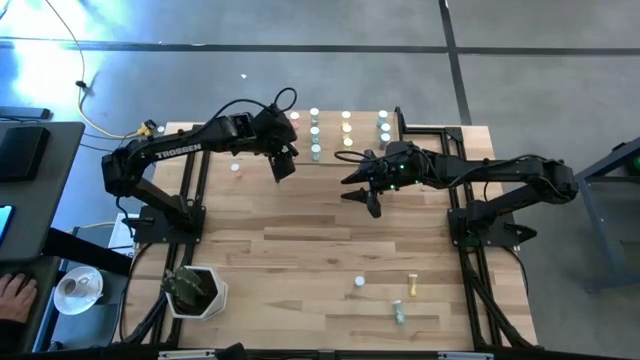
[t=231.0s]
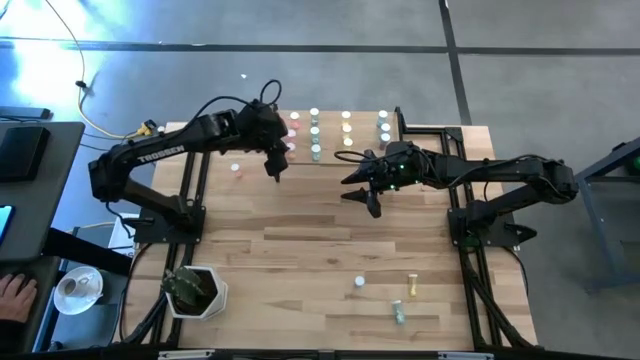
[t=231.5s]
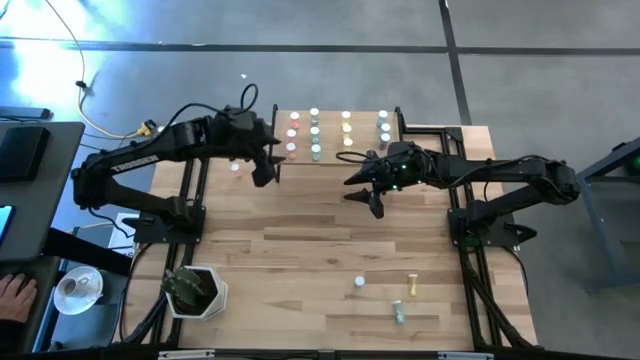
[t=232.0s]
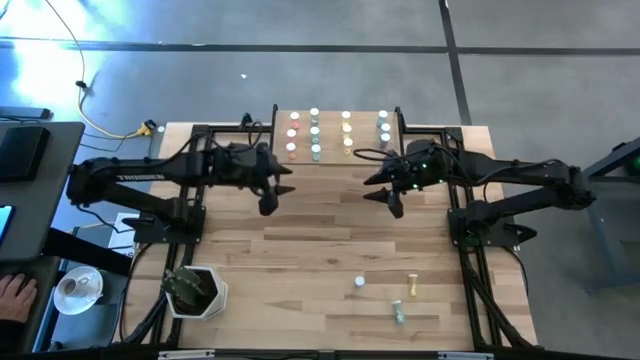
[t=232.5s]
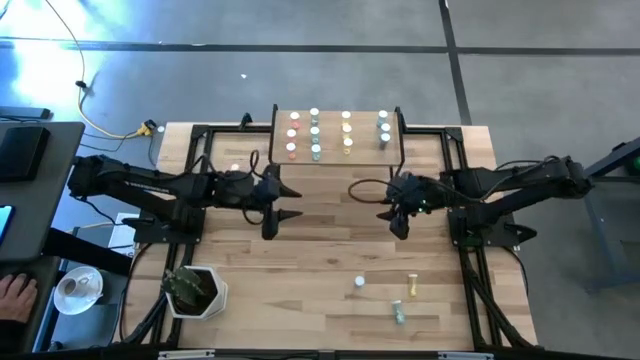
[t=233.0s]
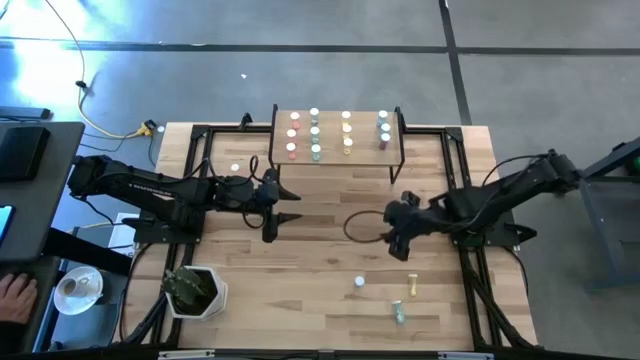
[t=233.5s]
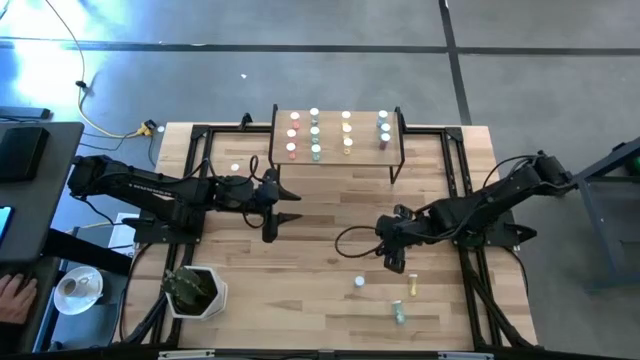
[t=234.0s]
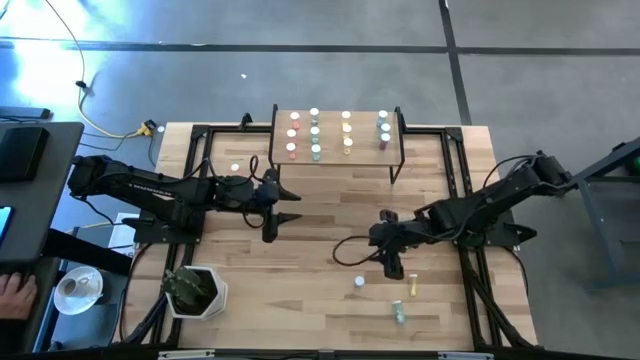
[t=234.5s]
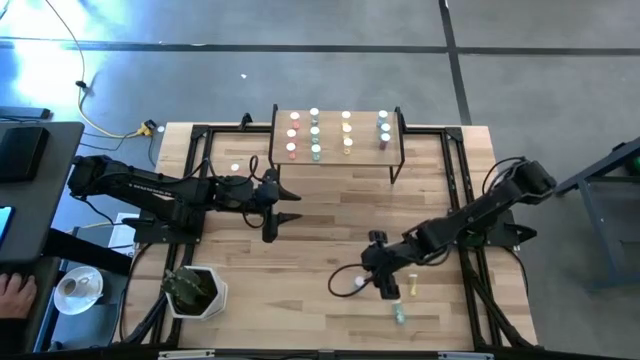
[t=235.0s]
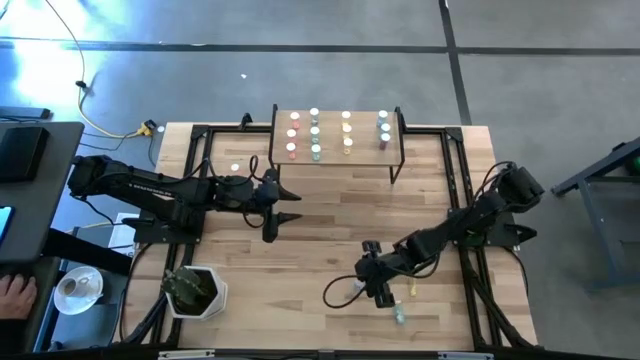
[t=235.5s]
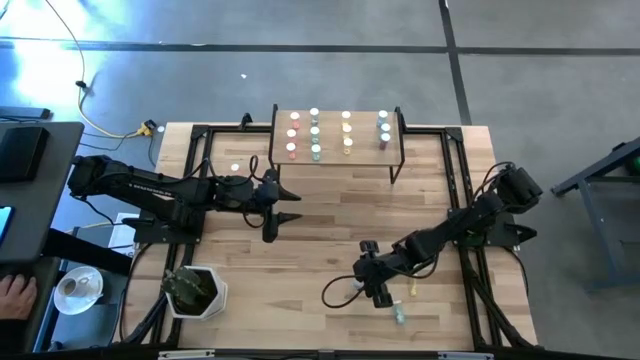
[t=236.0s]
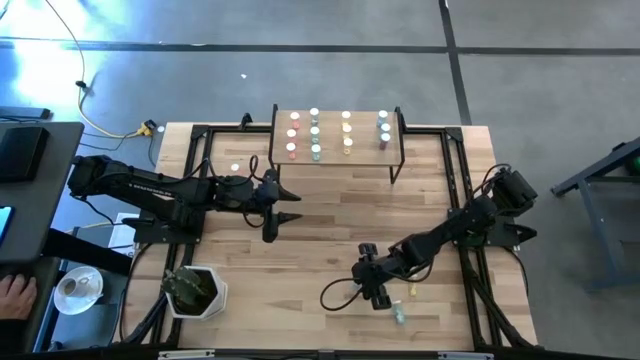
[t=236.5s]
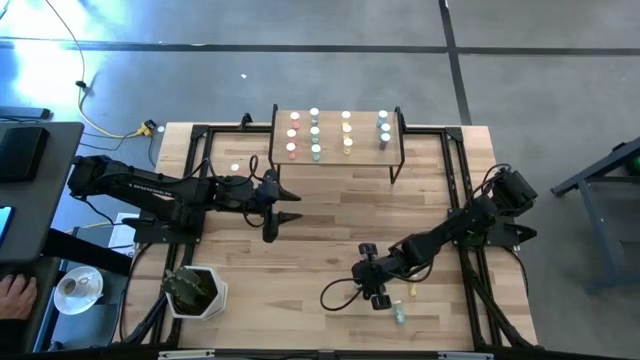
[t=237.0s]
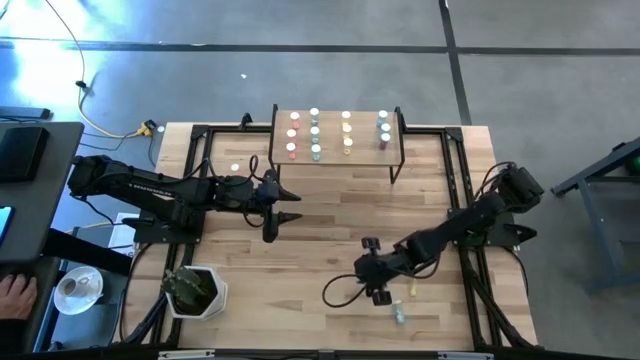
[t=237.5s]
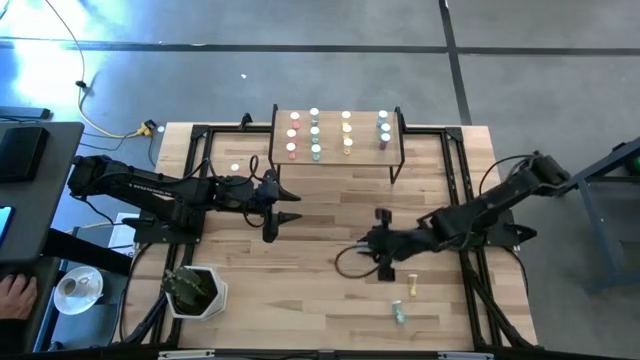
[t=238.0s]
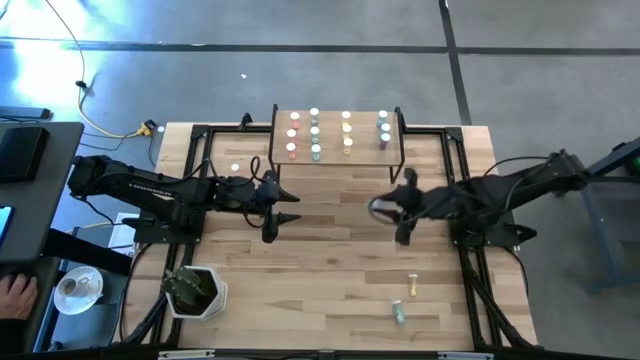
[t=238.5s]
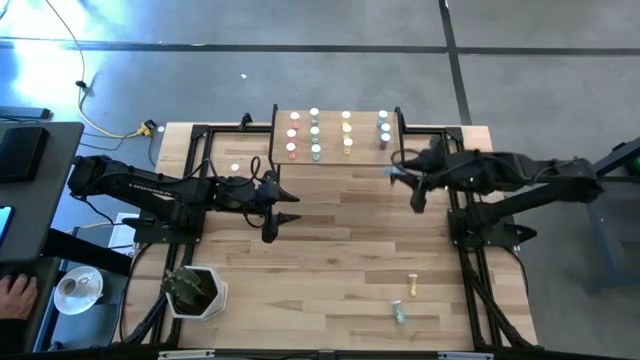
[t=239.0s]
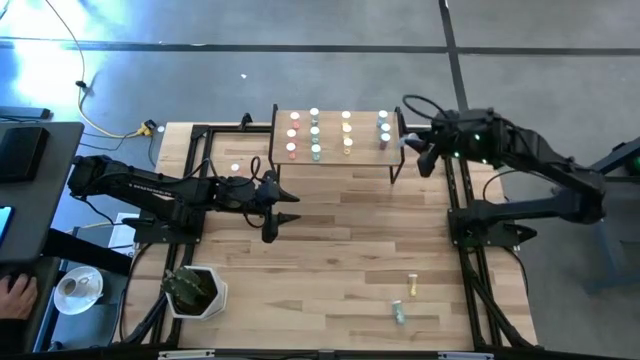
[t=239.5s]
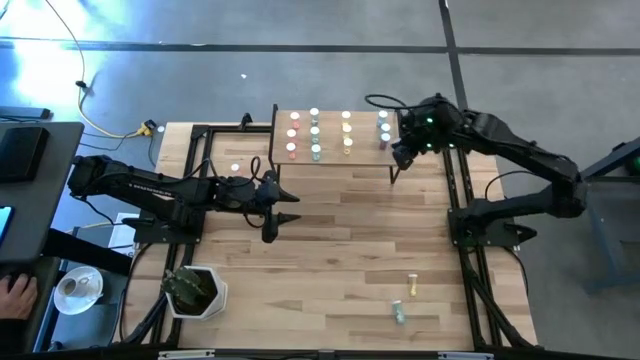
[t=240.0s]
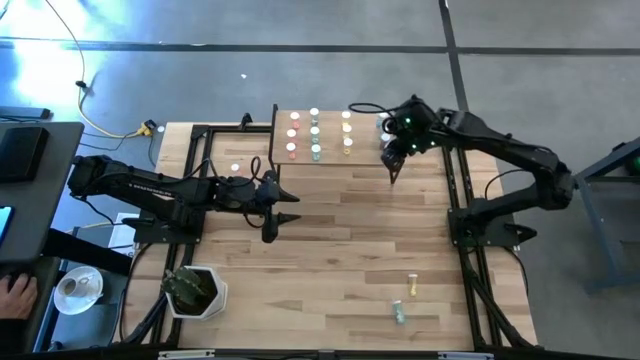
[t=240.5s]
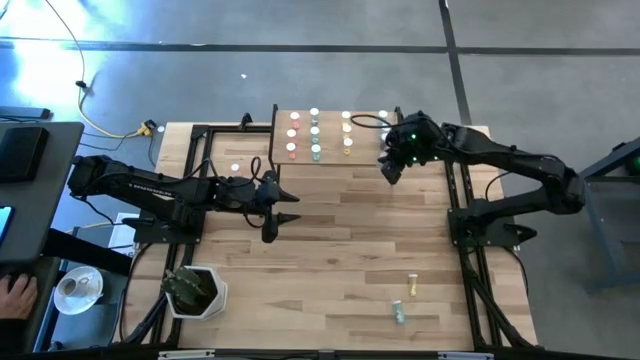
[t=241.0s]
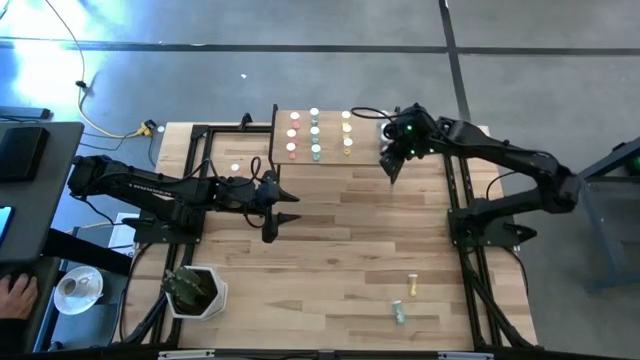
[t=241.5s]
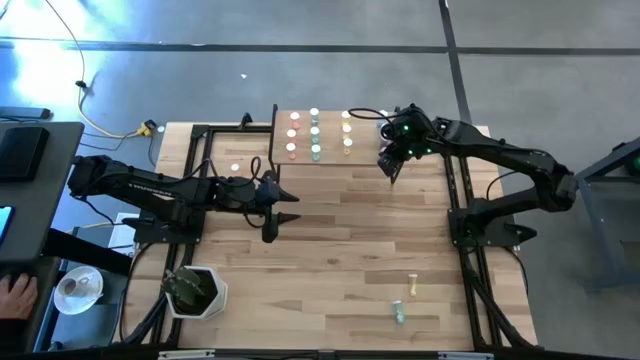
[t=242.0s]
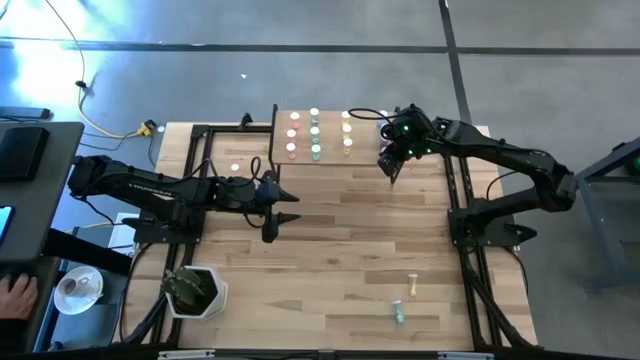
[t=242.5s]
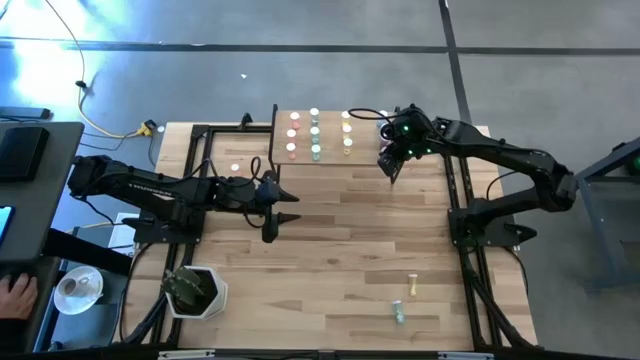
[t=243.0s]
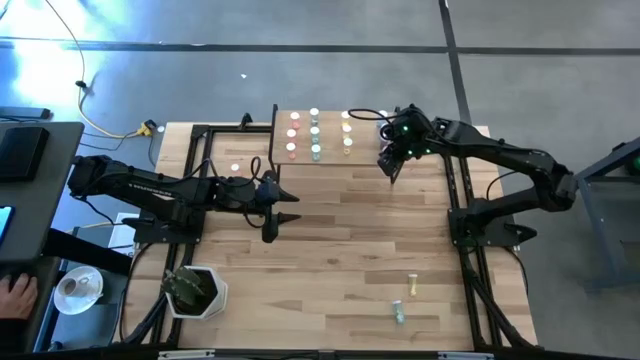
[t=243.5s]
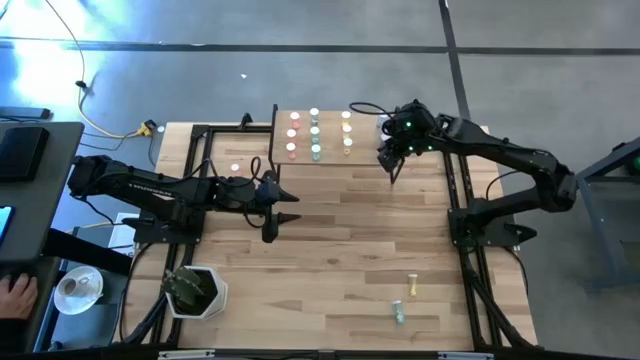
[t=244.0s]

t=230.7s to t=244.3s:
Task: Pick and place medicine bottles onto shelf by color
Put the blue medicine bottle on the shelf

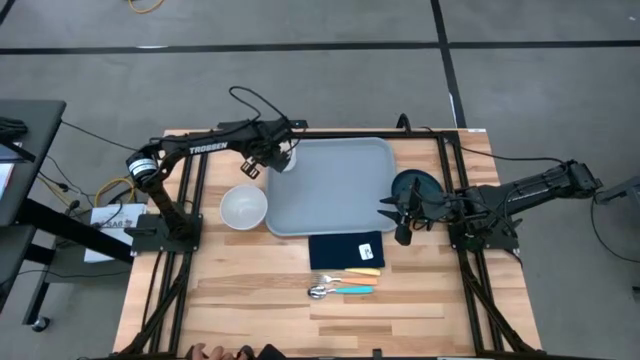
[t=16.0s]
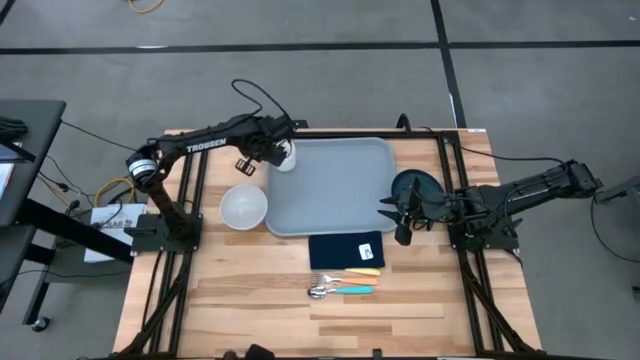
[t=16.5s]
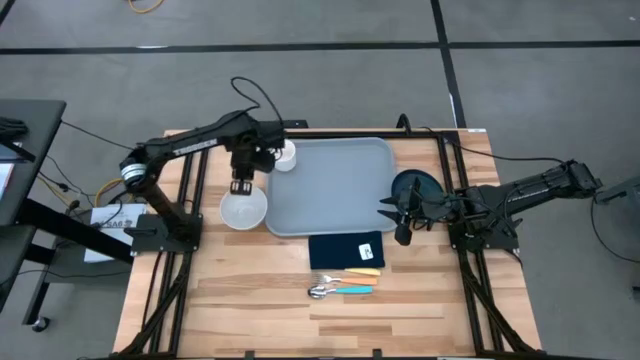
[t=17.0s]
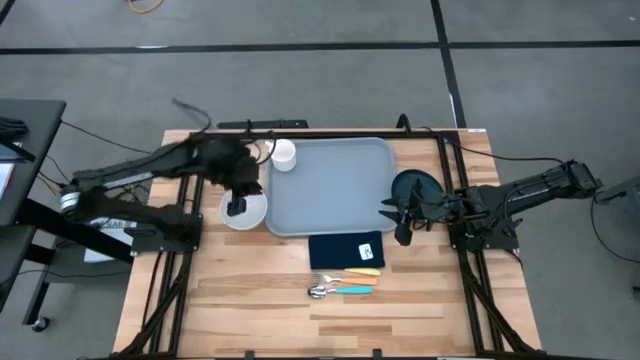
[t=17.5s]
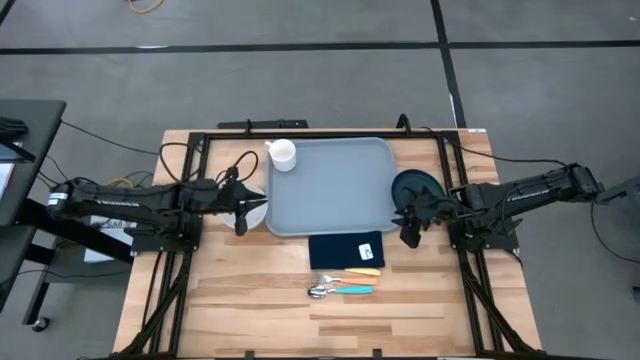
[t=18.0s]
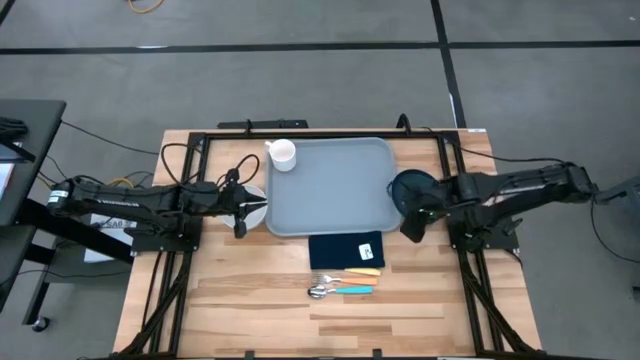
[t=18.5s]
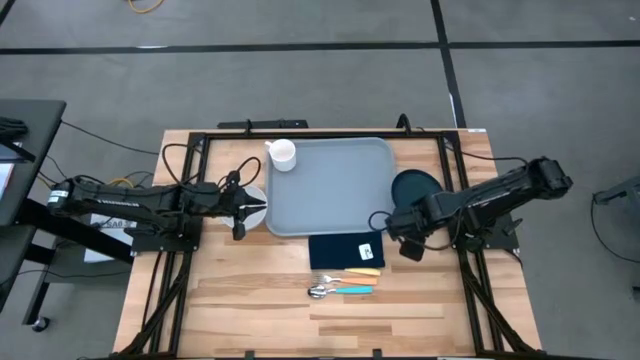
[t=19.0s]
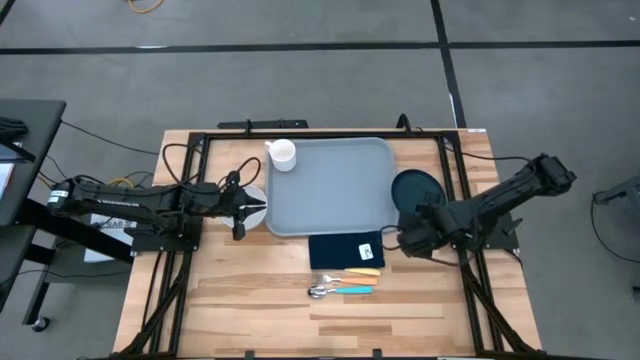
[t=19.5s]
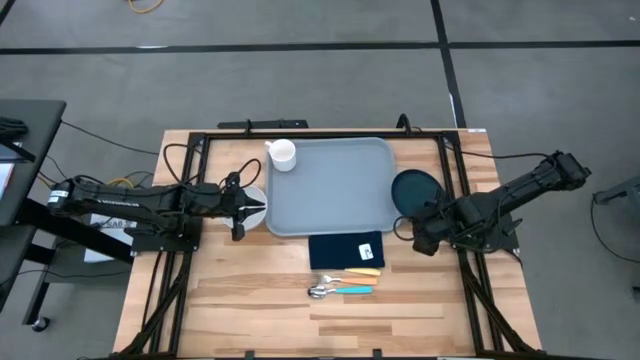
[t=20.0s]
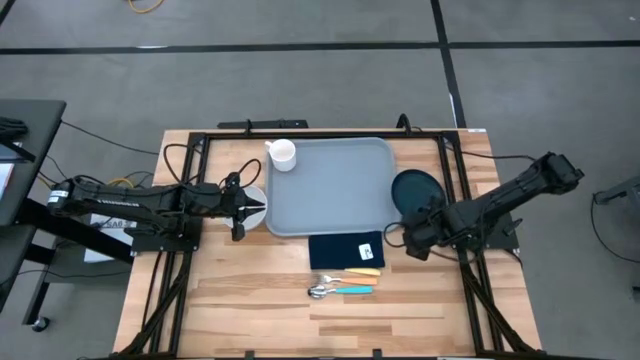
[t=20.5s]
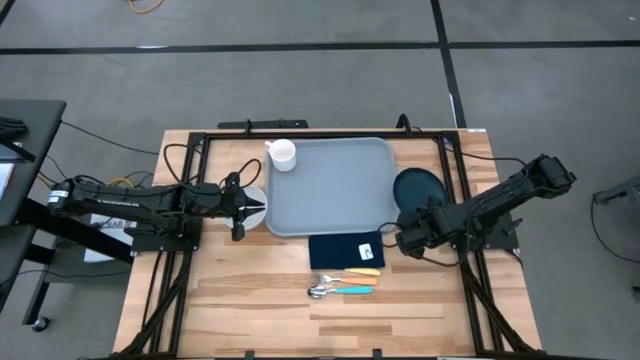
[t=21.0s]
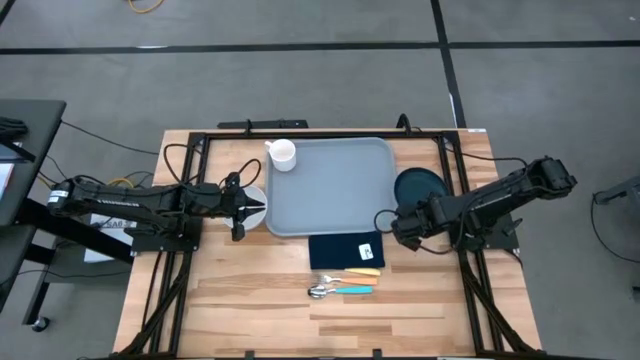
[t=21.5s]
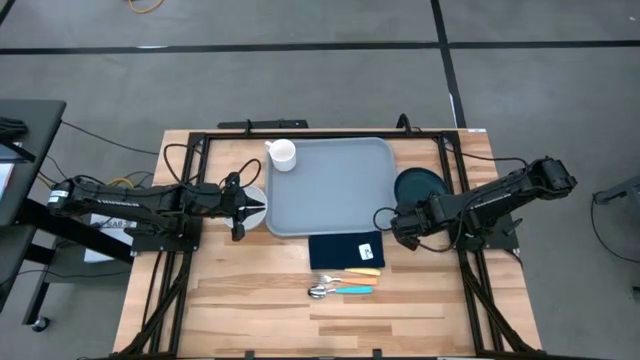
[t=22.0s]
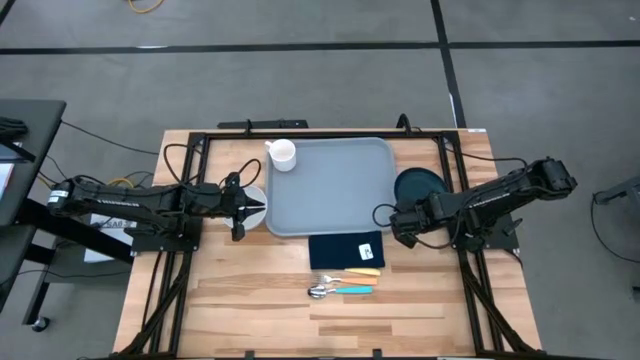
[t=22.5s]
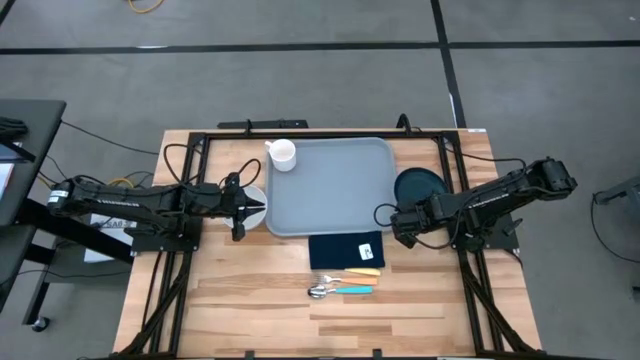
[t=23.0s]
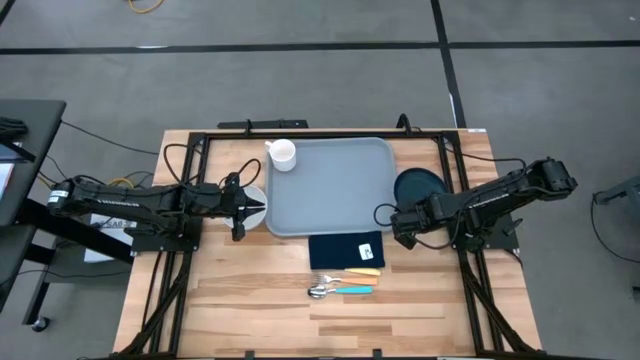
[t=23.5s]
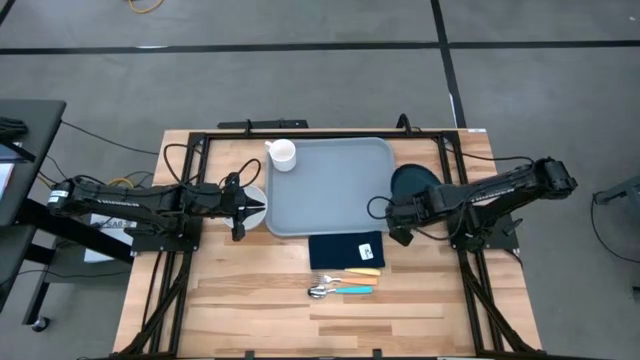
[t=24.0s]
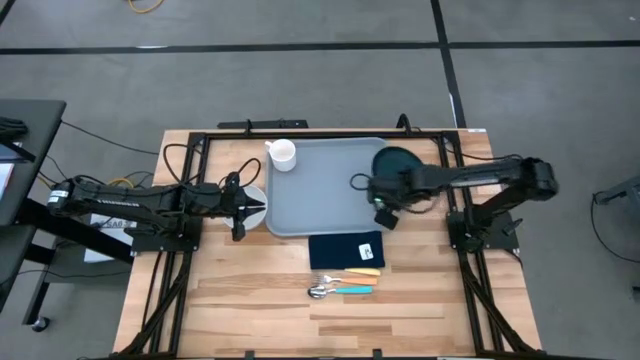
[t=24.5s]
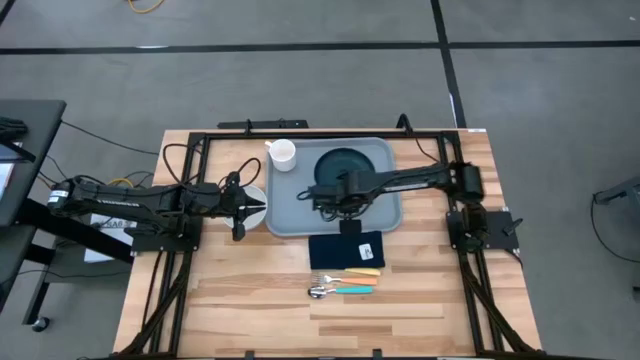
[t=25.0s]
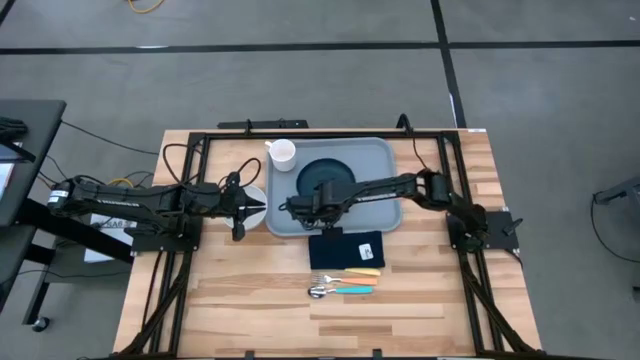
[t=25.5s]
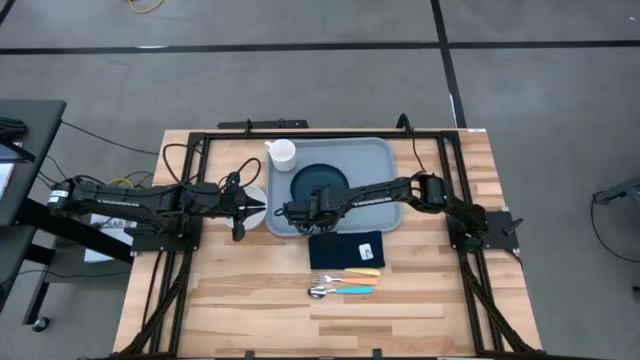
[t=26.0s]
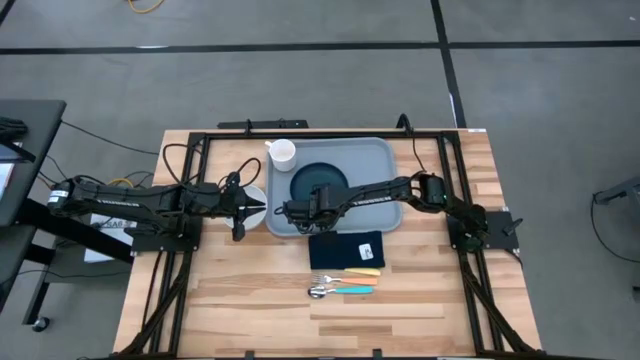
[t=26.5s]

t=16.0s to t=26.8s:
Task: Set up tray
Put the black plate on the gray serving tray below the white mug
